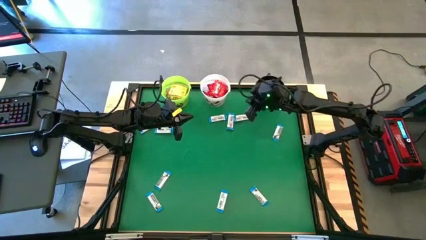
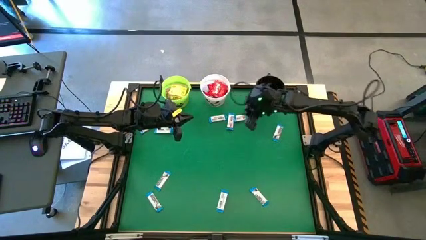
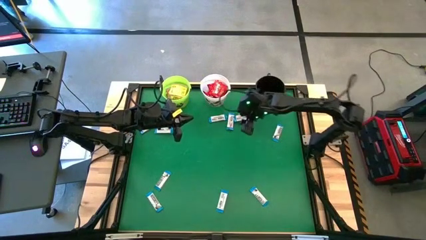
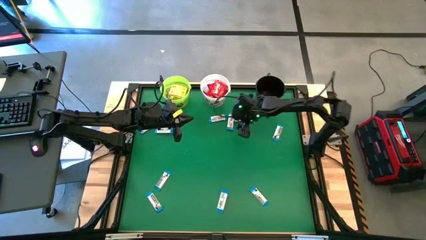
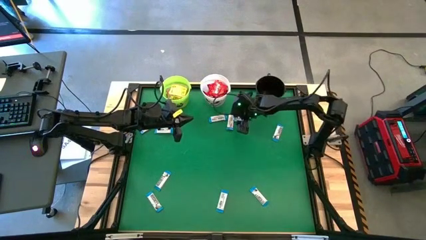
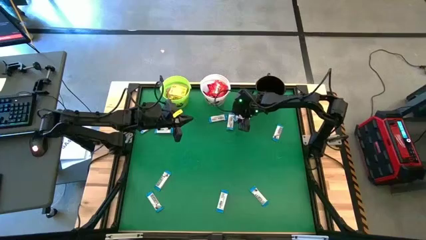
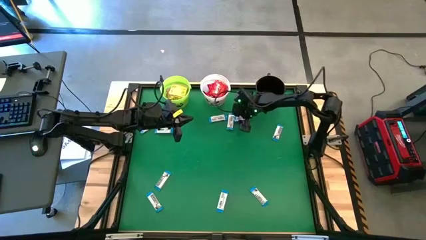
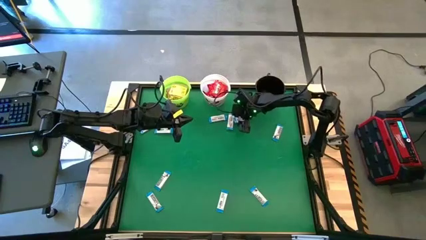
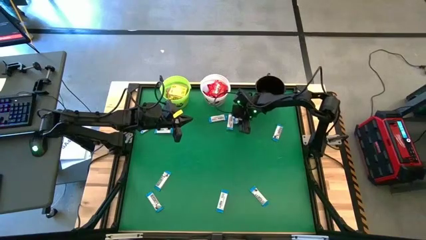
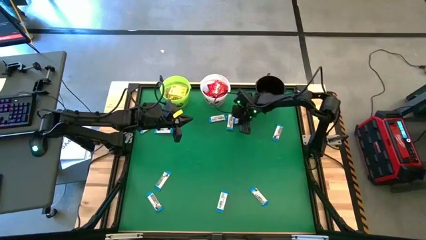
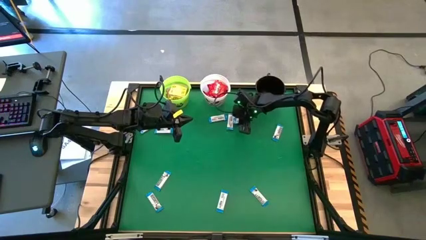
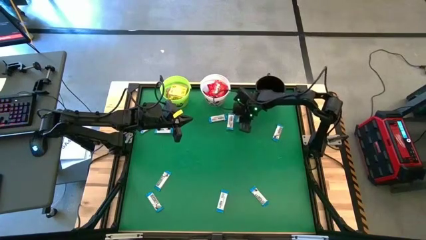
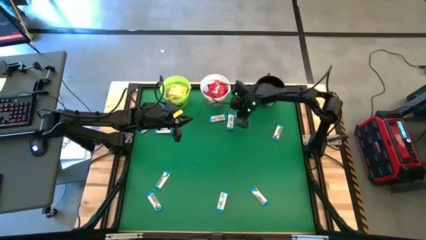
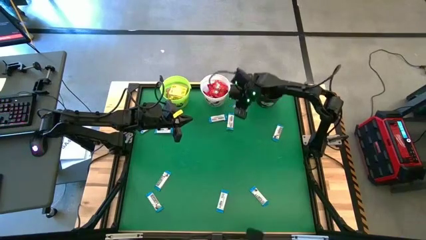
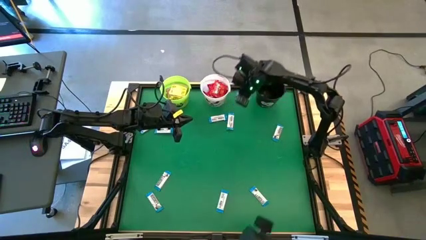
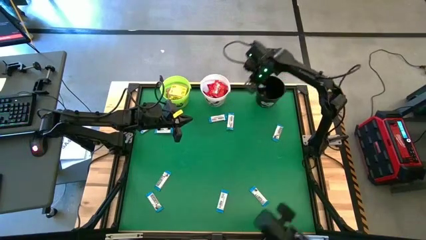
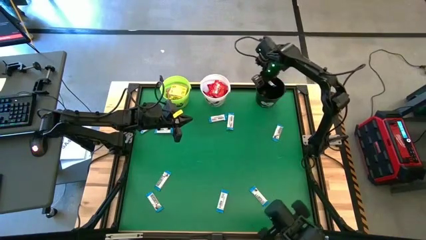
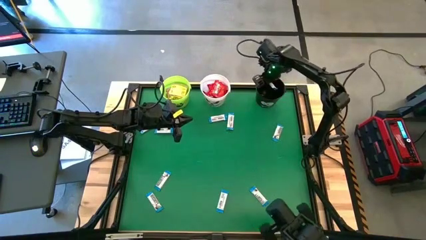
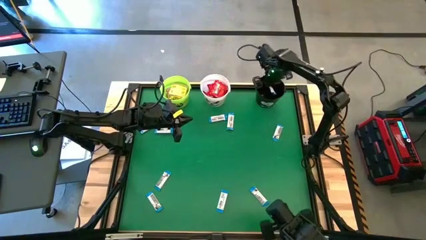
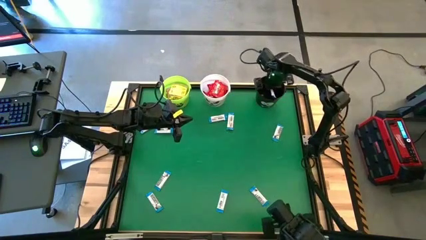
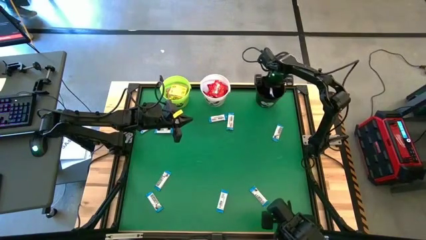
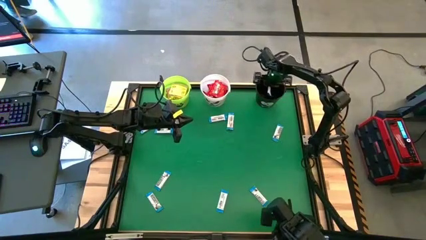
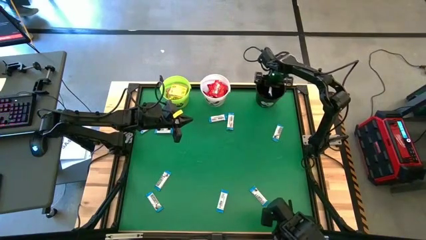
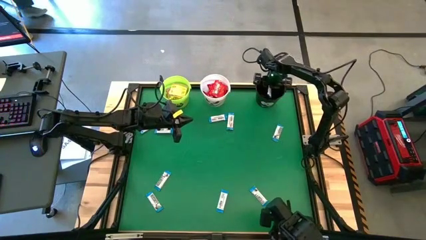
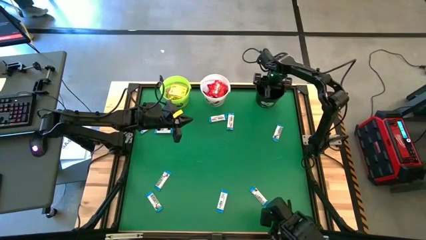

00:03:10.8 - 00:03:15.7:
Task: Sort candy by brand, put in halloween buckets
Put the white chocolate bar into the black bucket

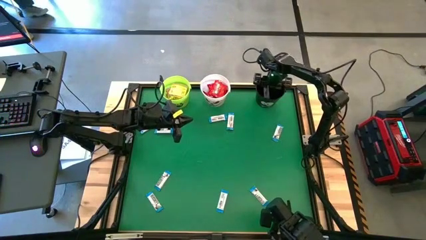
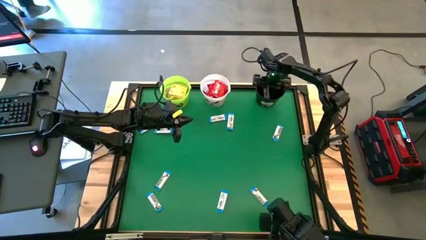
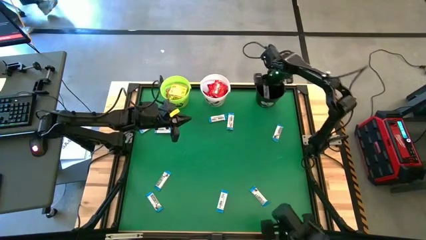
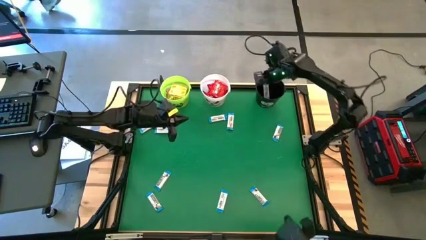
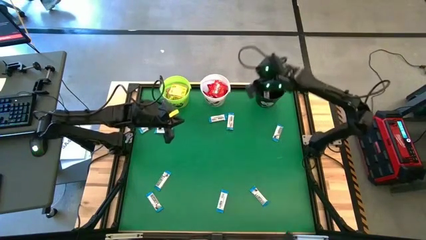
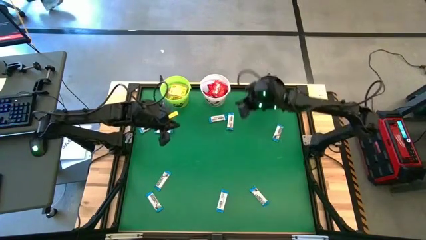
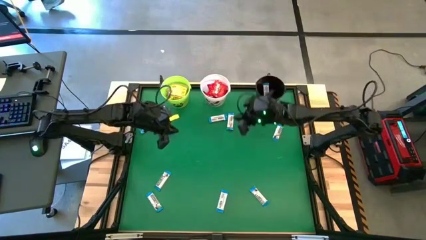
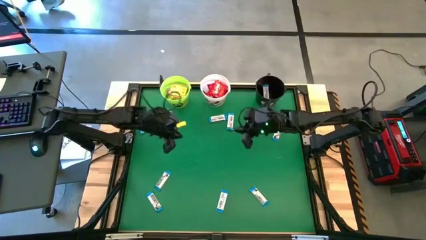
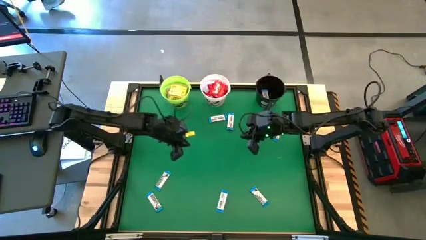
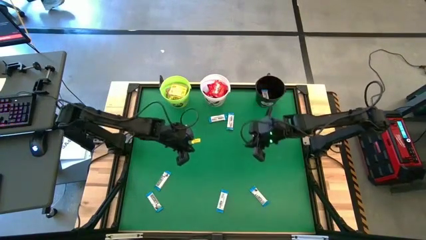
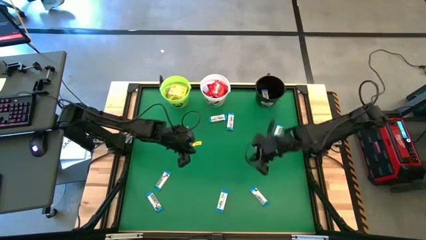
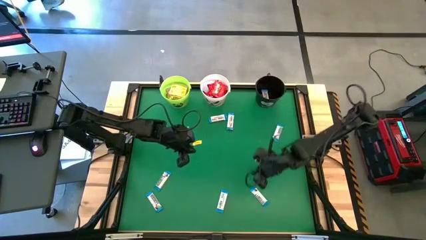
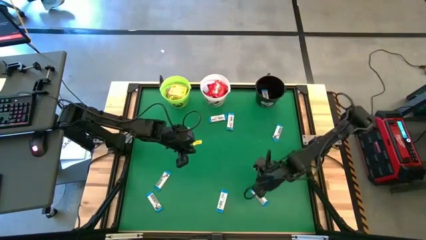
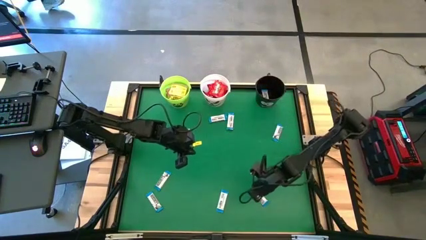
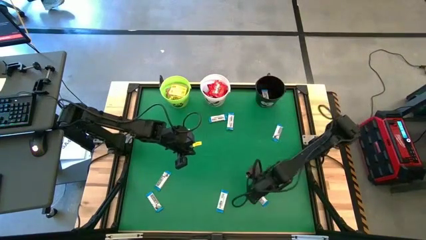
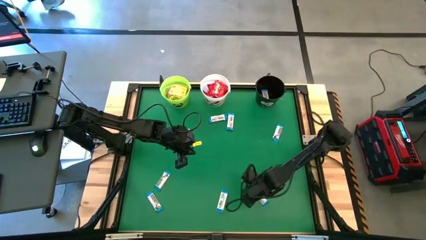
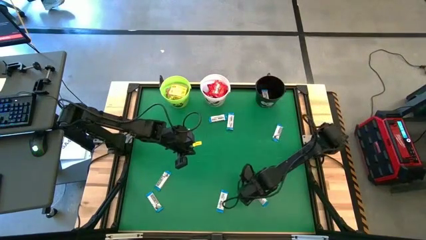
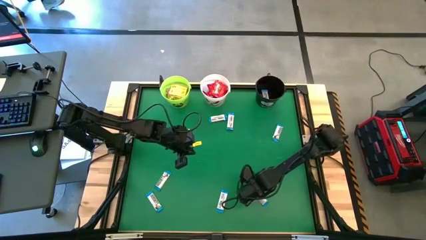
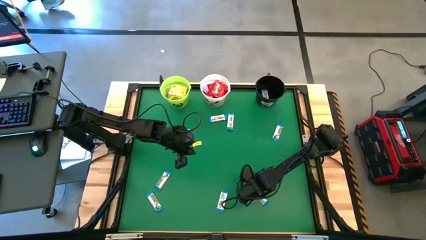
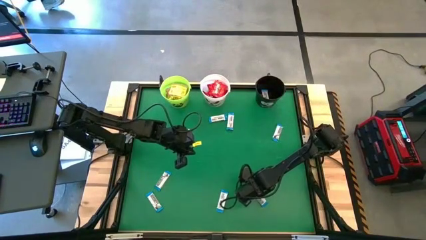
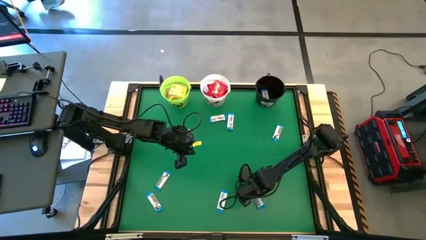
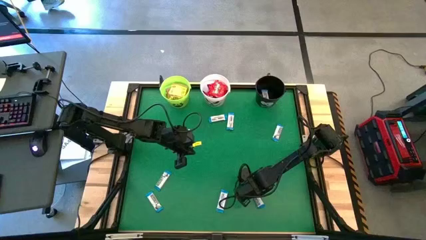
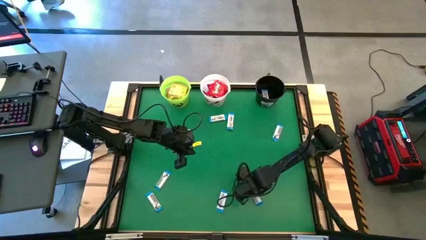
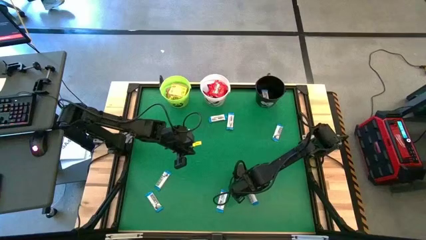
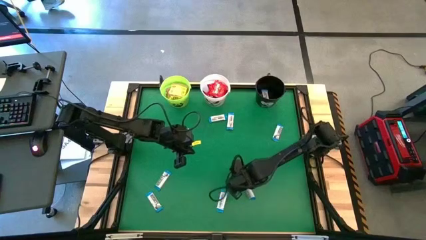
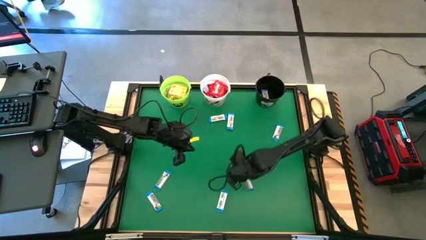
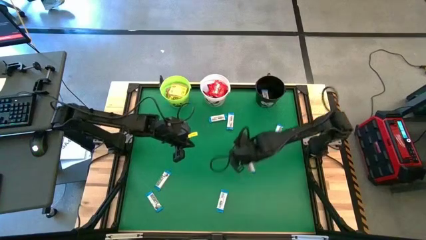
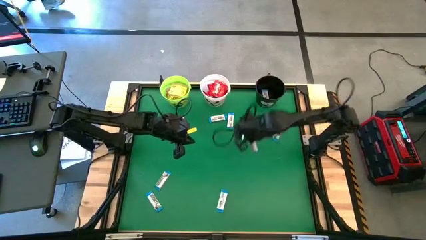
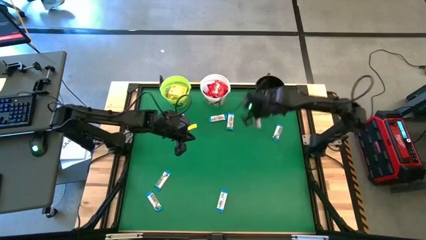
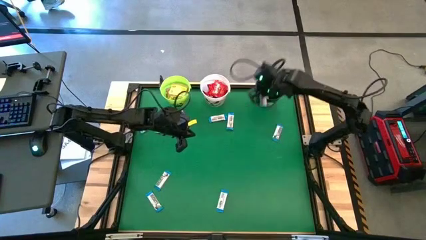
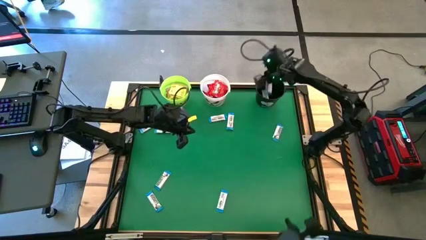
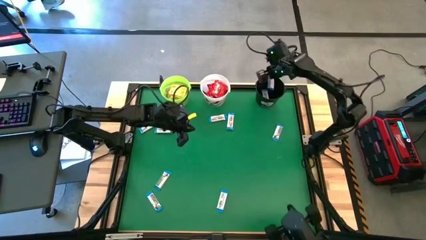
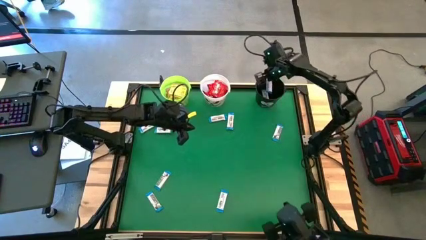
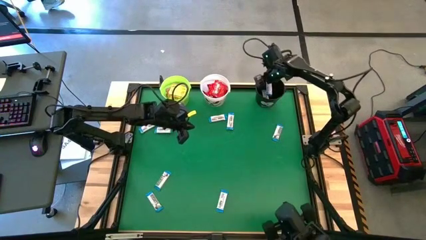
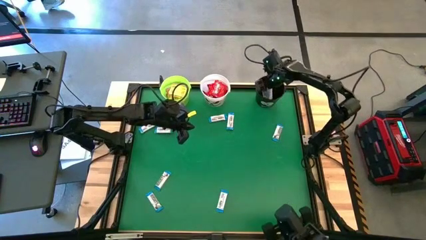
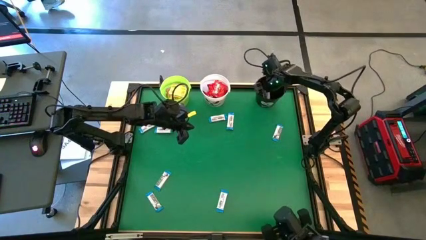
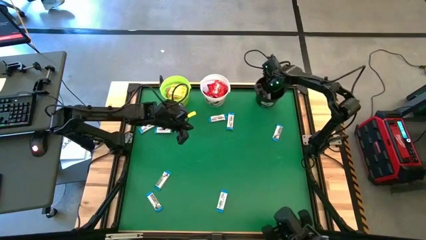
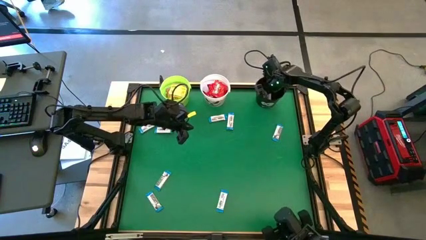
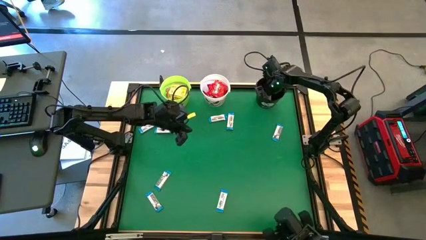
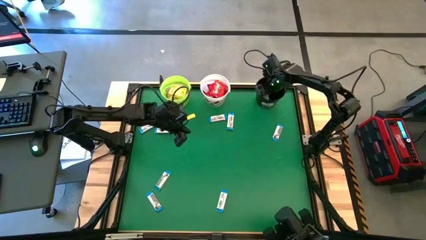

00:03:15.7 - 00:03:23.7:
Put the white chocolate bar into the black bucket

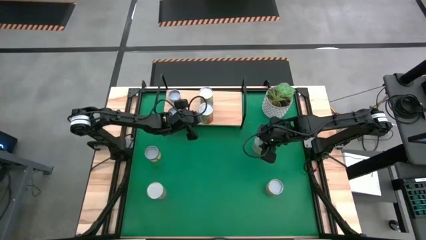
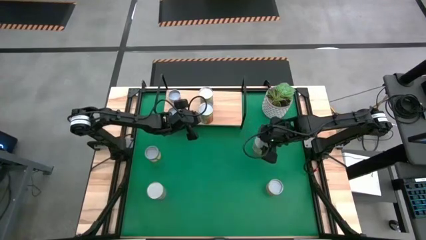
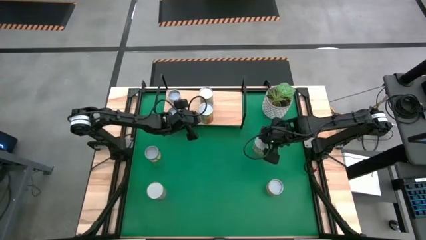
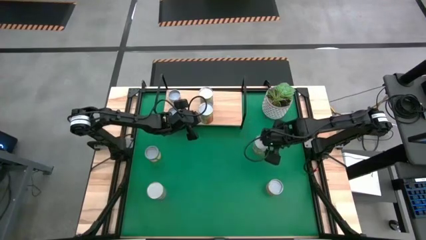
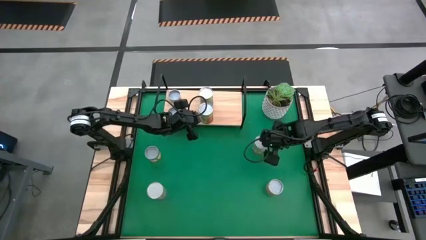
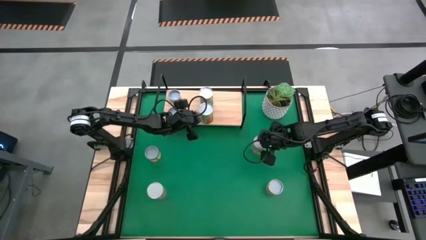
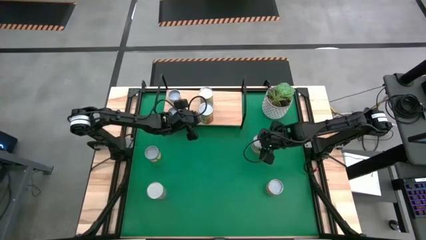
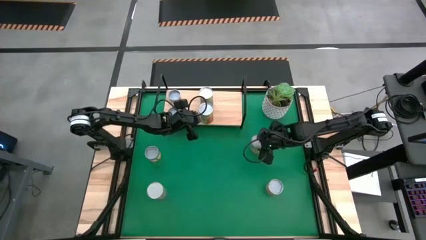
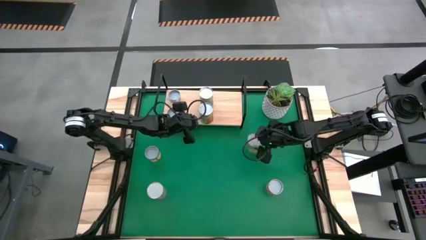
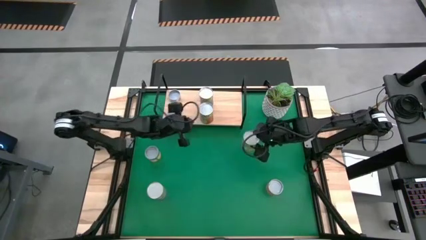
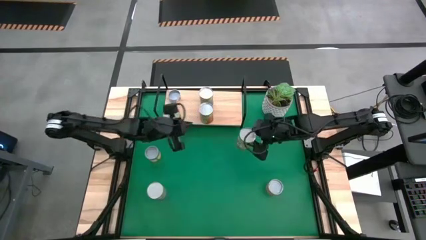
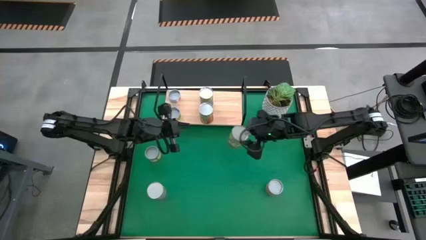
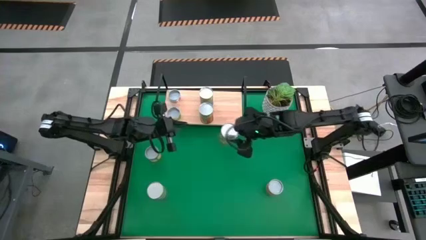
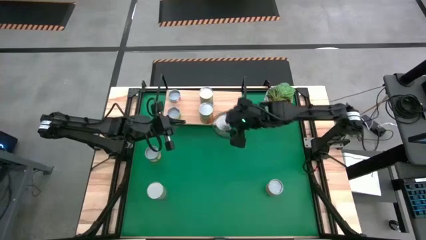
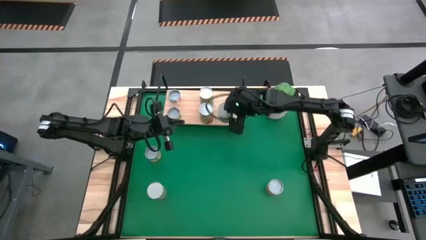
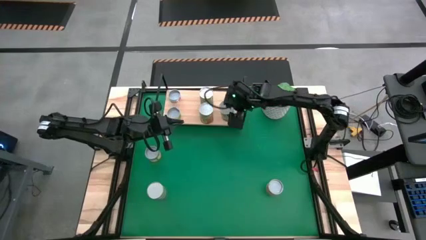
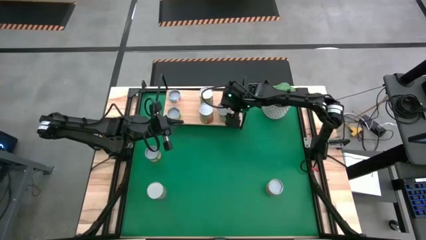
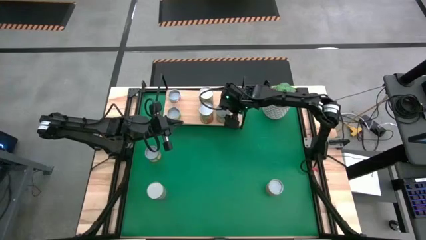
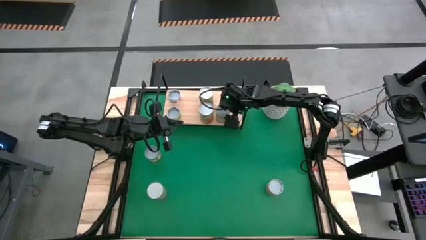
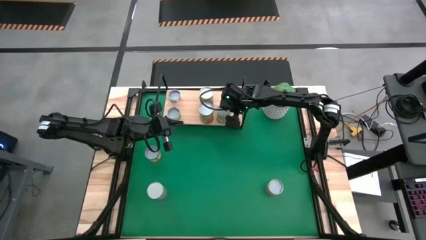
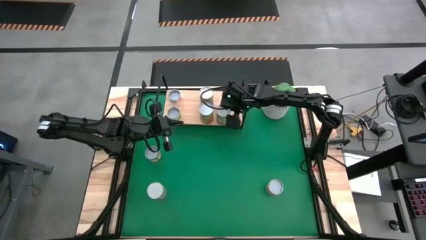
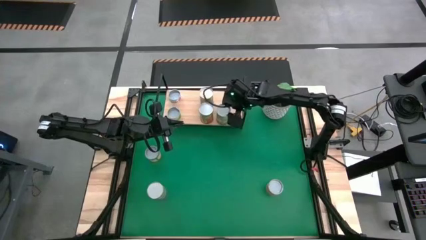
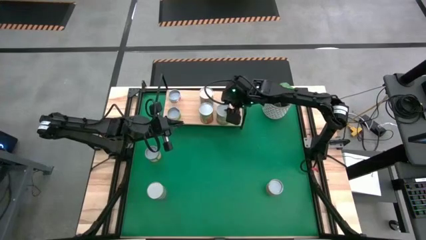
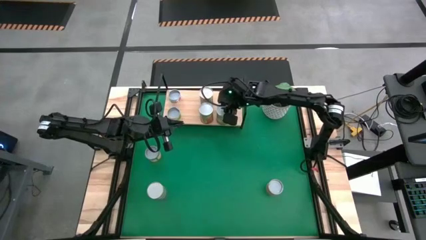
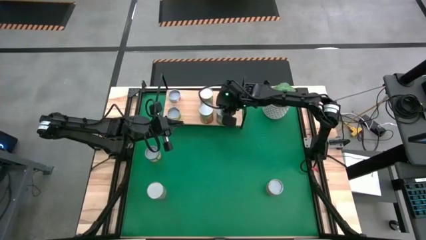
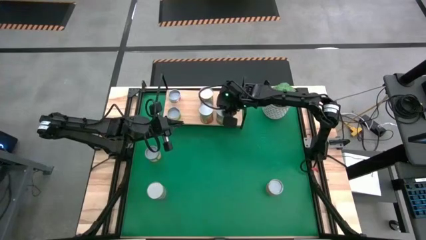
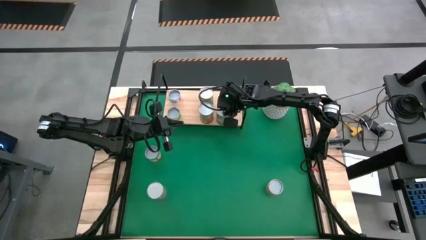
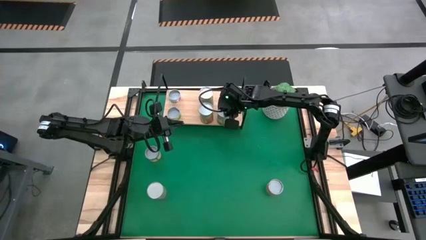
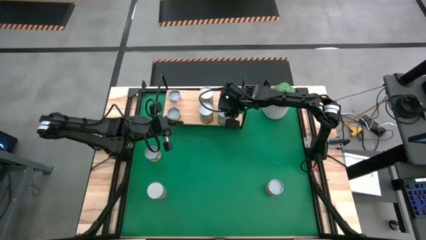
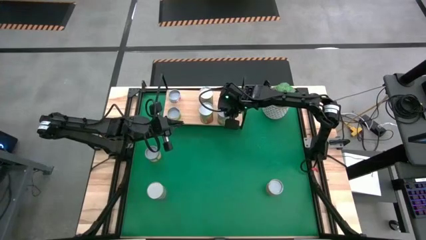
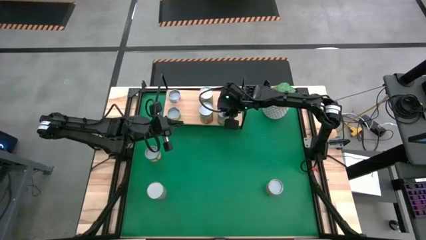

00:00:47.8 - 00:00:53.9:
Task: Pick and place cans onto a shelf
Put the canned pears on the shelf
